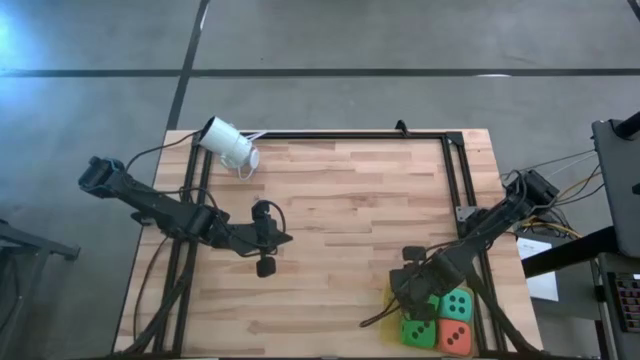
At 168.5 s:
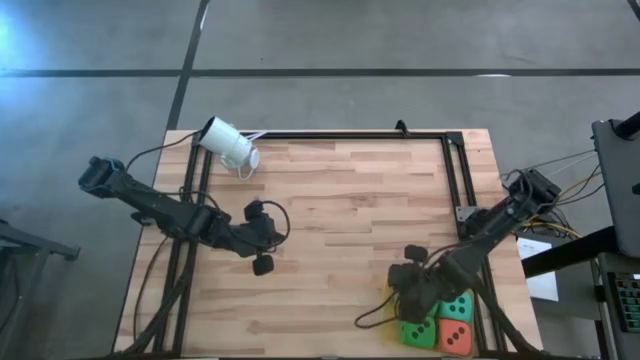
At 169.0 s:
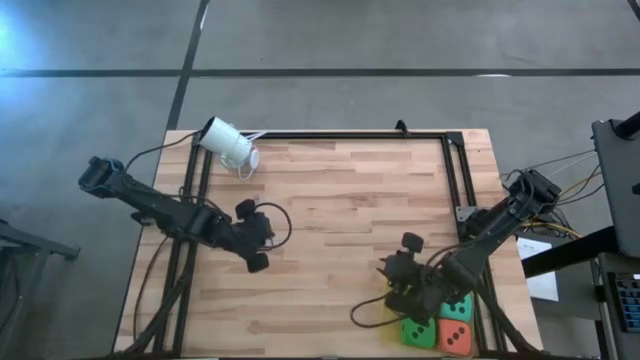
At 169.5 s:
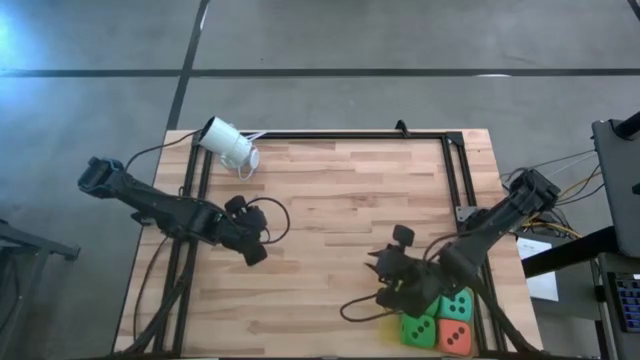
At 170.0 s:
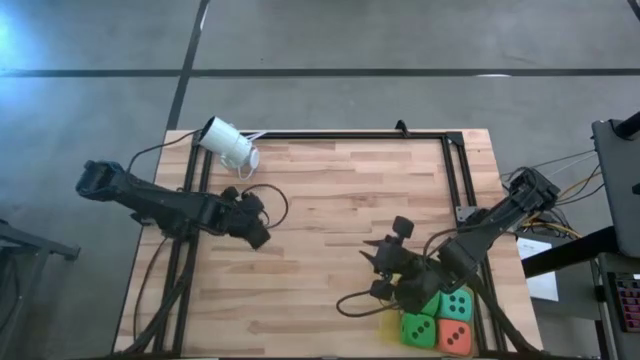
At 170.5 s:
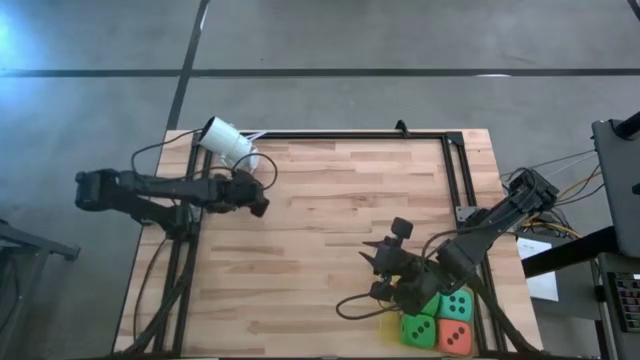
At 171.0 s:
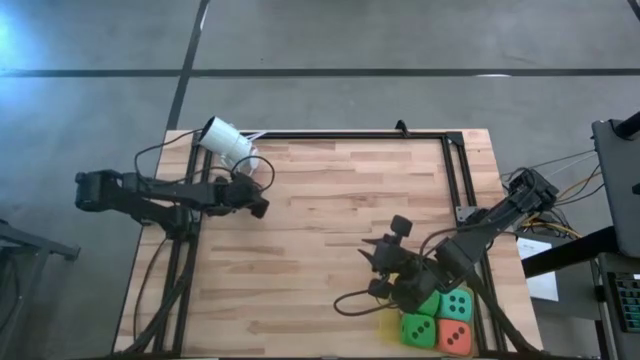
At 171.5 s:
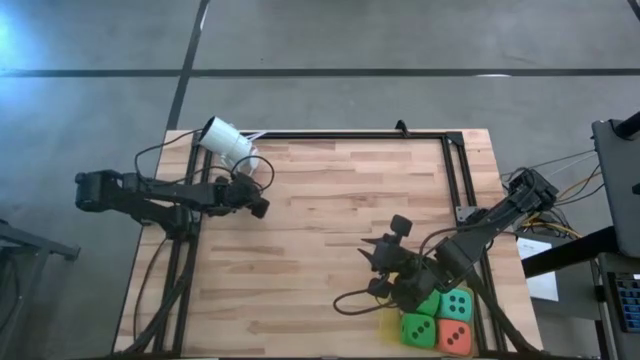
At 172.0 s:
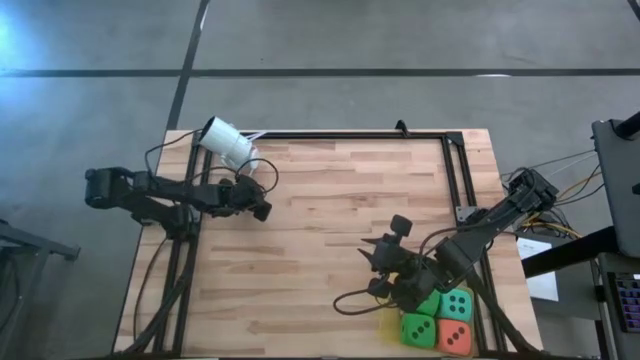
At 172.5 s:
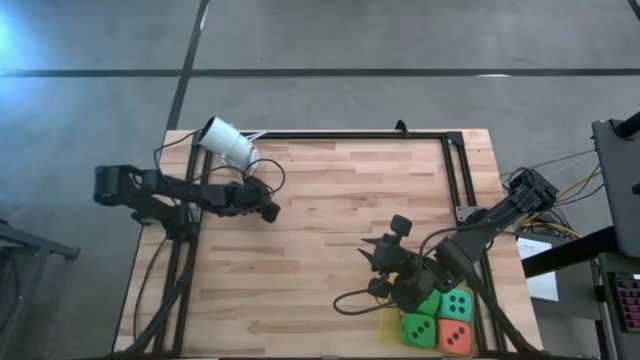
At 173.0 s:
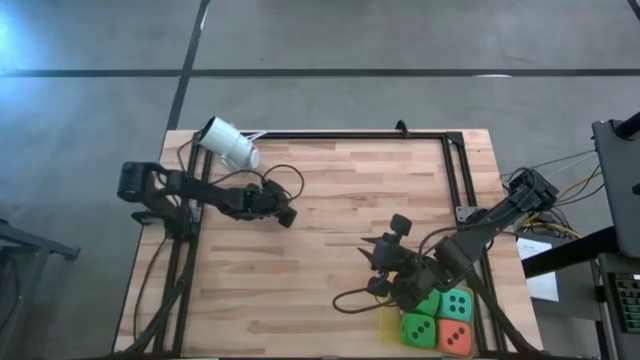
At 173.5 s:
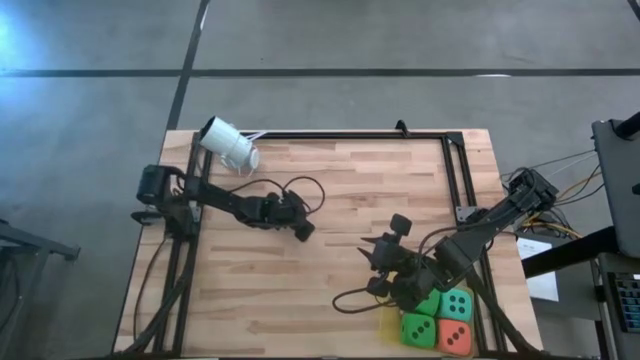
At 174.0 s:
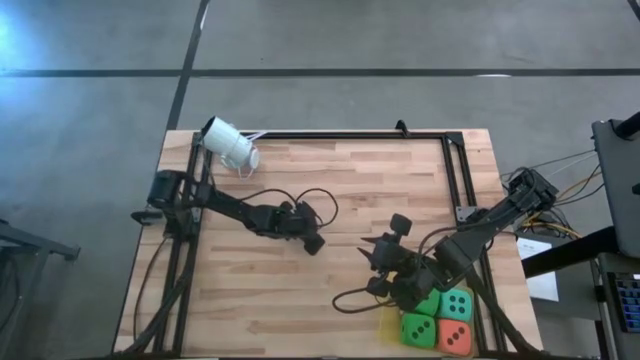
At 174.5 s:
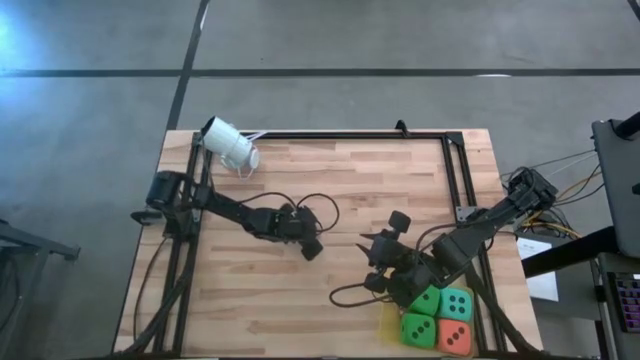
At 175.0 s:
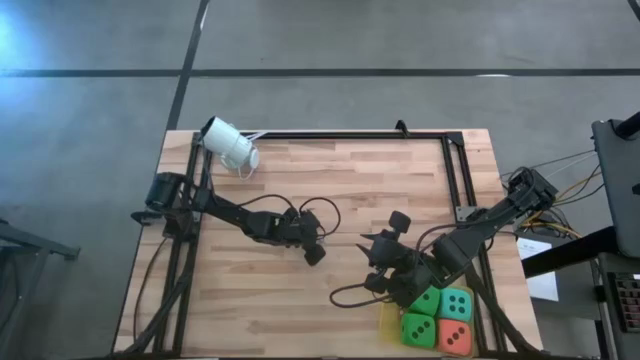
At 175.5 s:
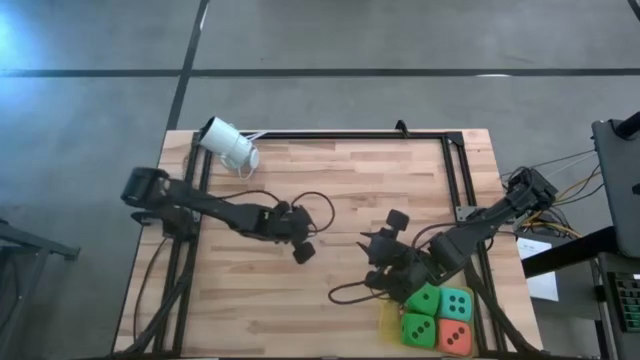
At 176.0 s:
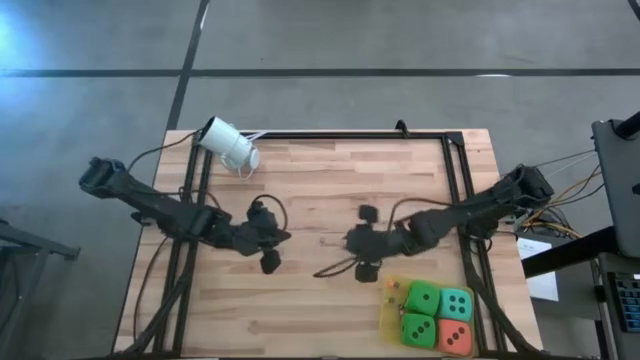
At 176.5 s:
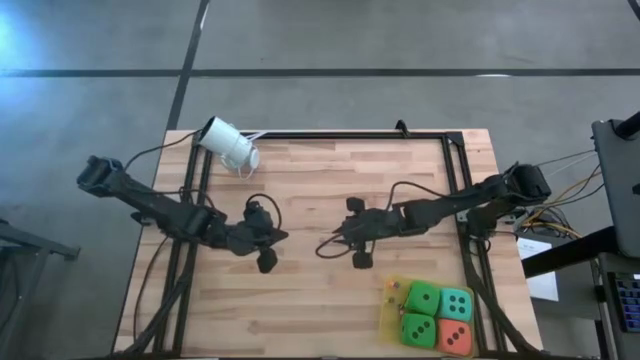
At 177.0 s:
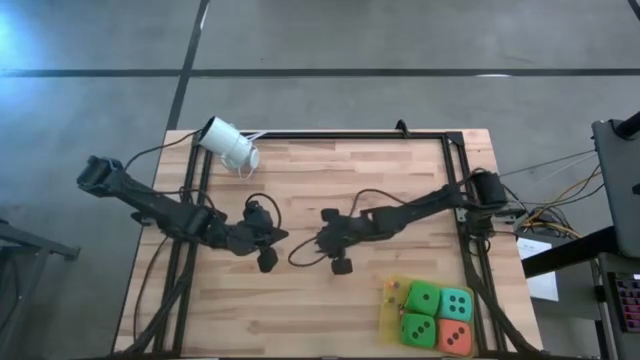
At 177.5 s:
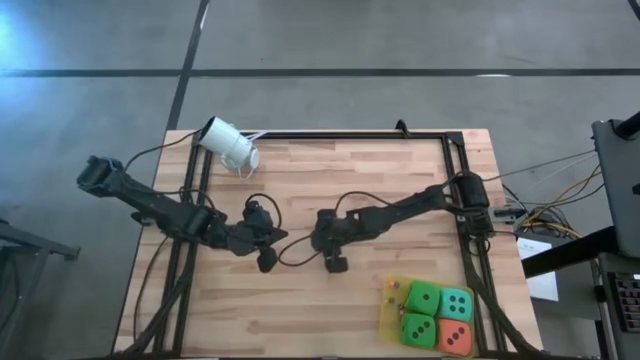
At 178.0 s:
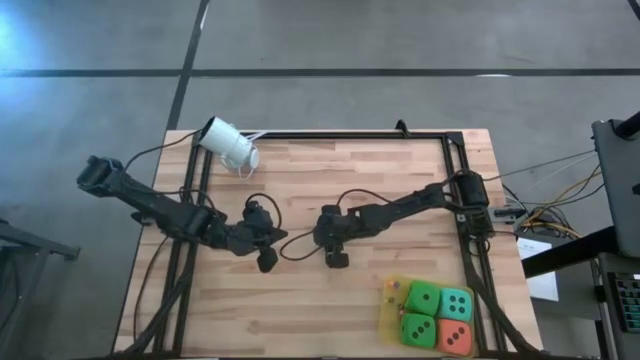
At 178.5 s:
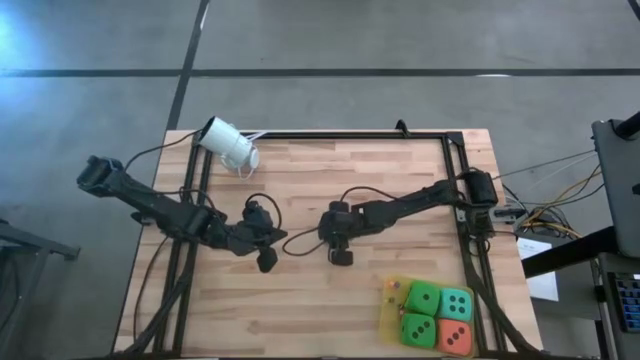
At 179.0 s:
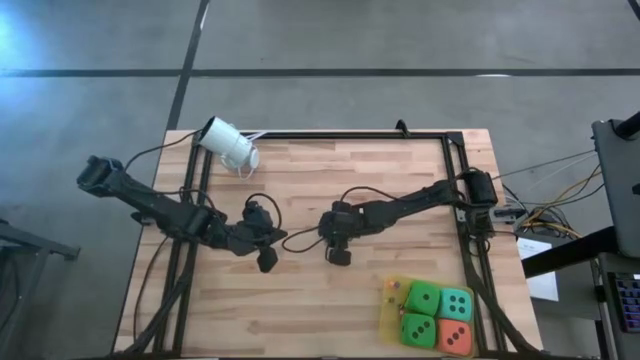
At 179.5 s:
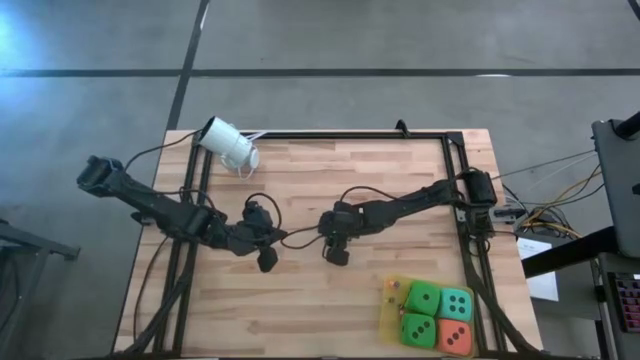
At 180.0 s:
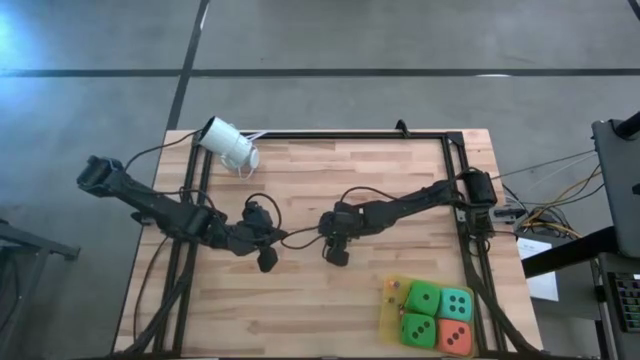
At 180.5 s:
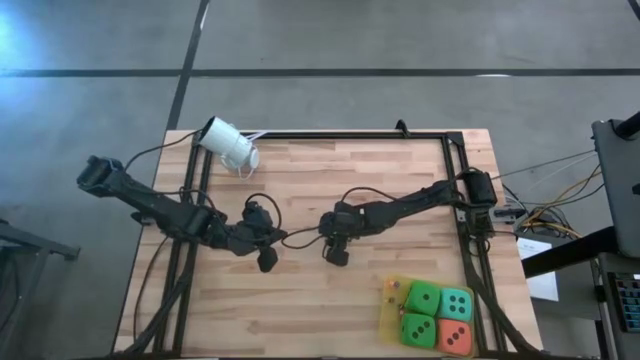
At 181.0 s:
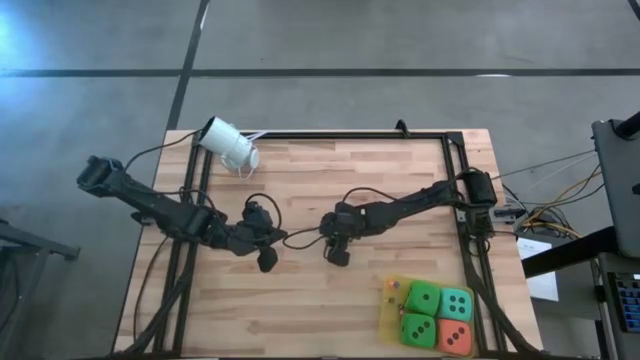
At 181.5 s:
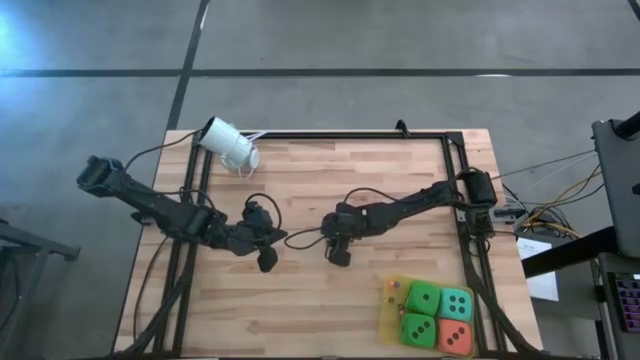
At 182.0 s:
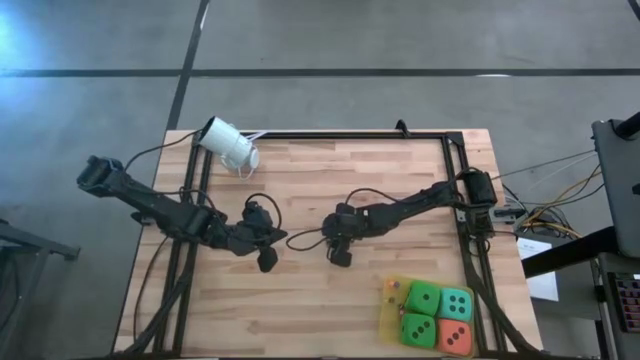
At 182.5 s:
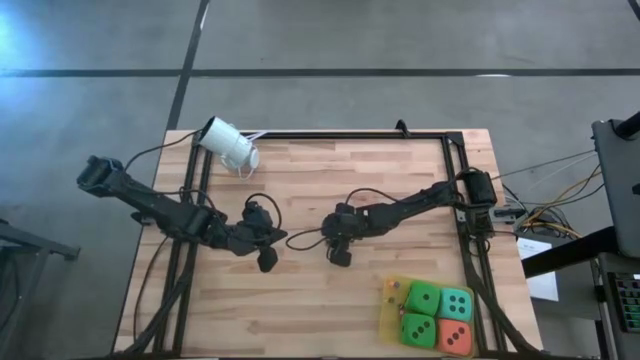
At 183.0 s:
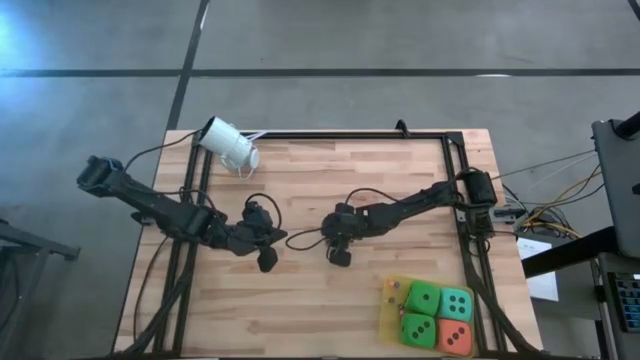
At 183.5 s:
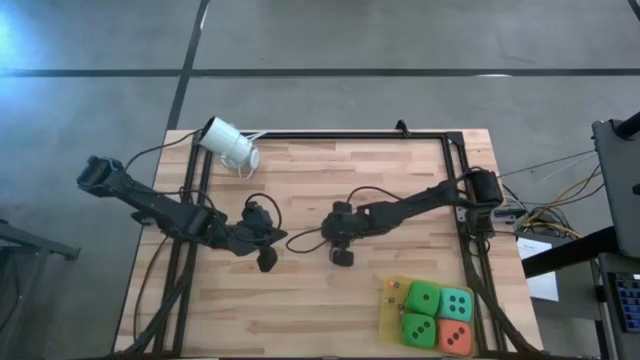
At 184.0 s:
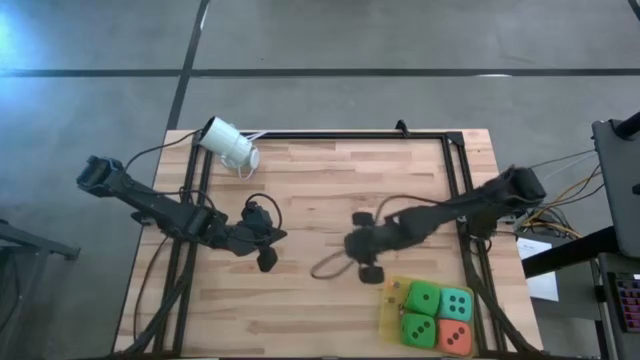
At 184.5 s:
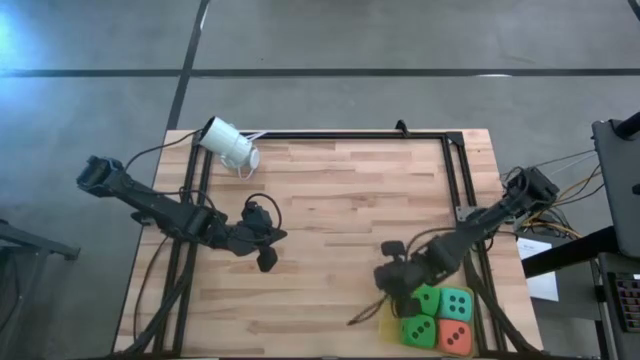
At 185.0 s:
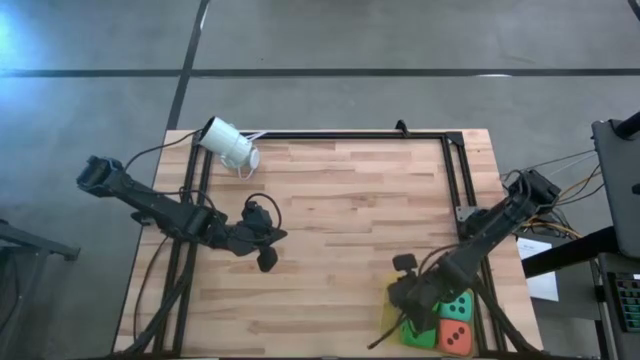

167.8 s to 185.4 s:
Task: Pick & Place Dice
Put the small purple die into the yellow bin

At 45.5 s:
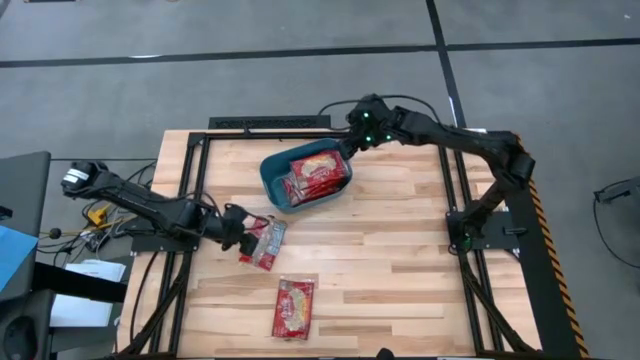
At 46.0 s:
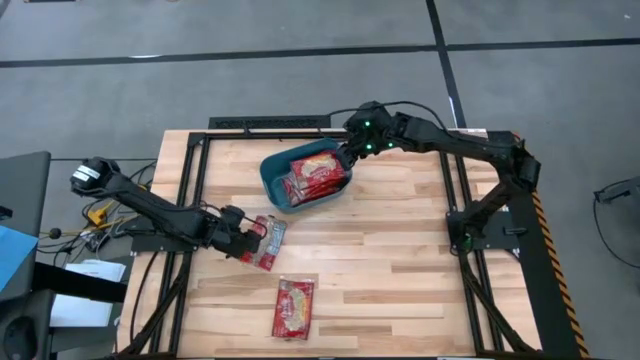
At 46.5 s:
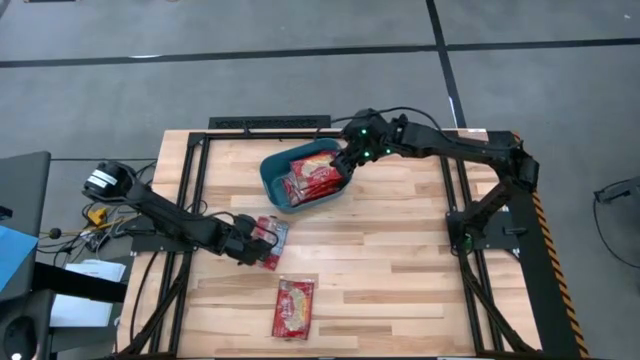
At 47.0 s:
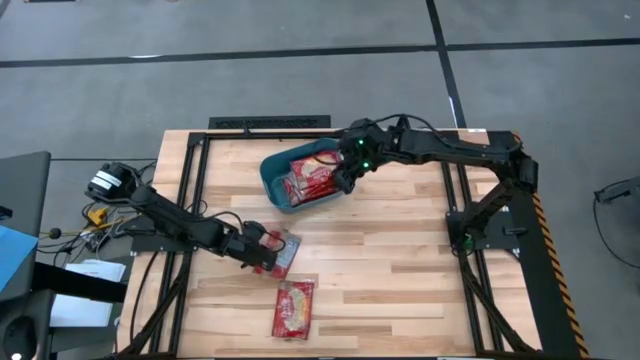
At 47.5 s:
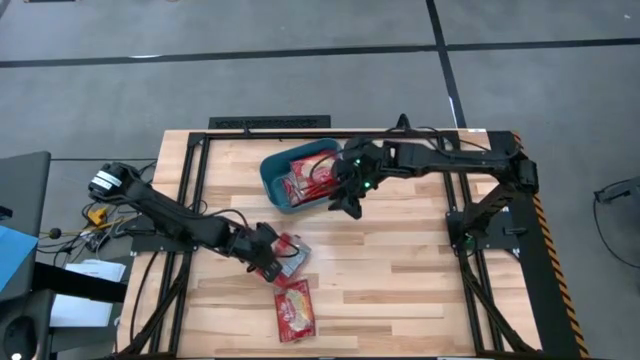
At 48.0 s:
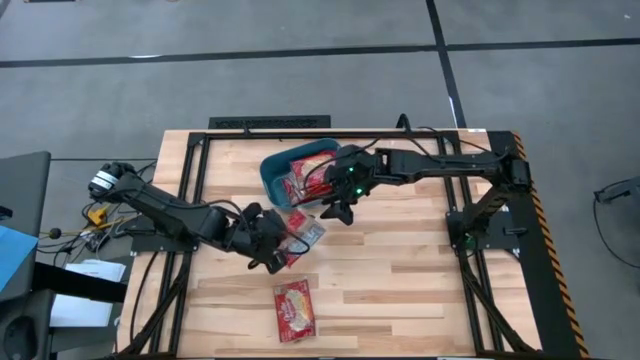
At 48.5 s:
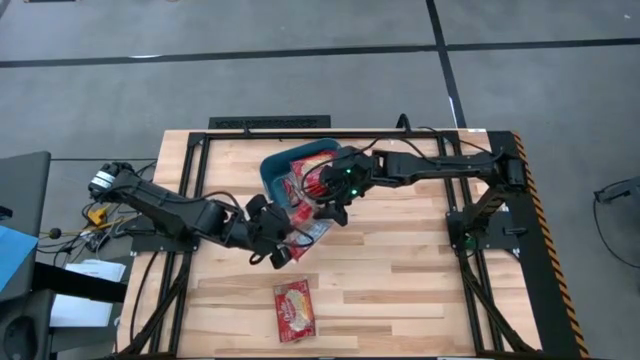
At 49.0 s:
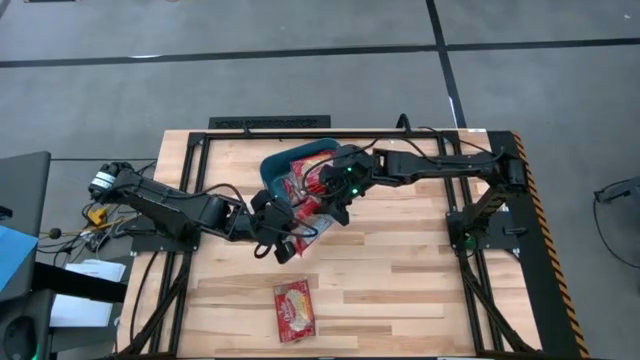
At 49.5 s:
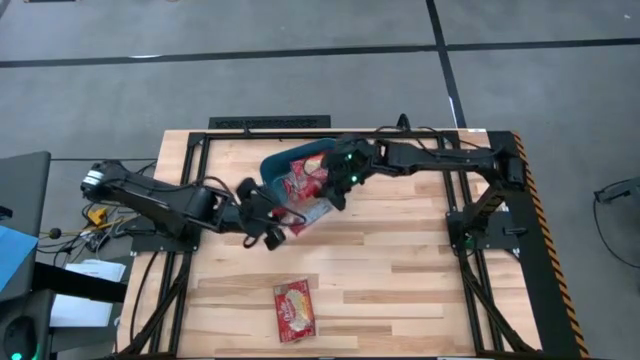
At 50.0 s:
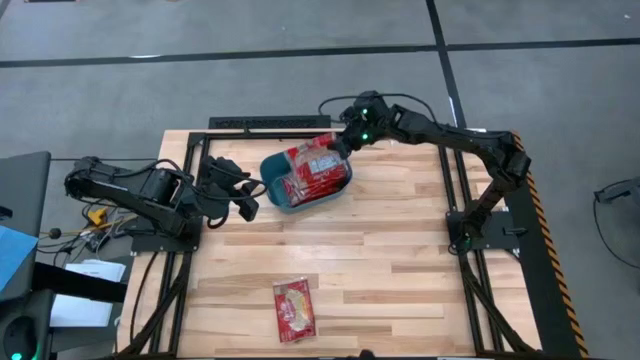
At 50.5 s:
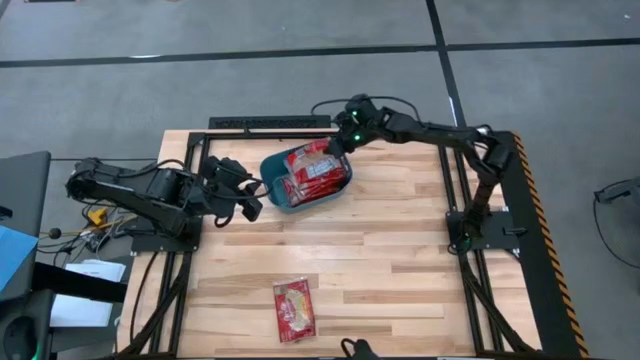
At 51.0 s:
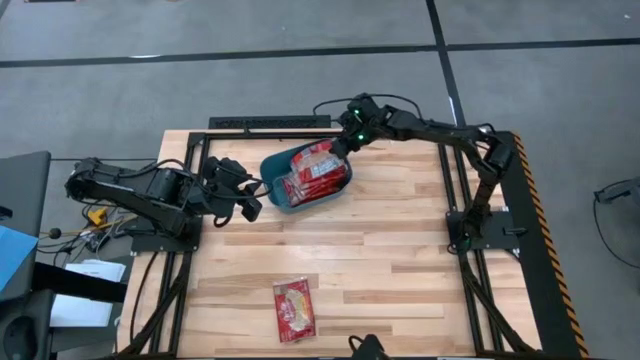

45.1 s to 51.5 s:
Task: Sort popcorn bags into baskets
Put the red popcorn bag into the blue bin
